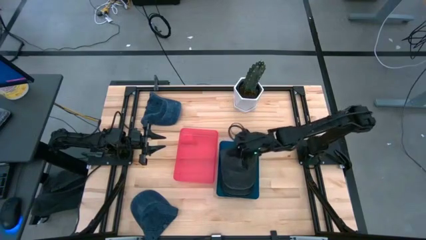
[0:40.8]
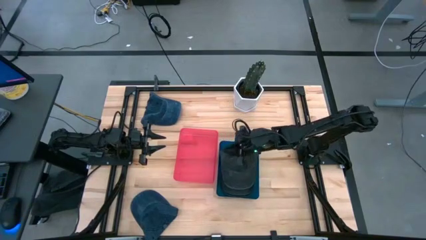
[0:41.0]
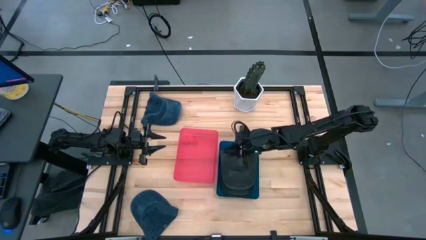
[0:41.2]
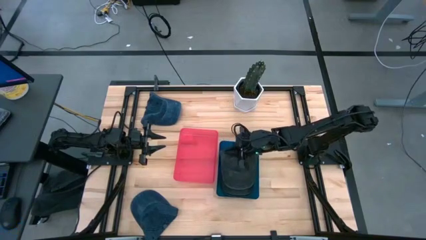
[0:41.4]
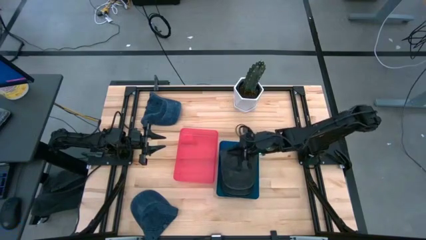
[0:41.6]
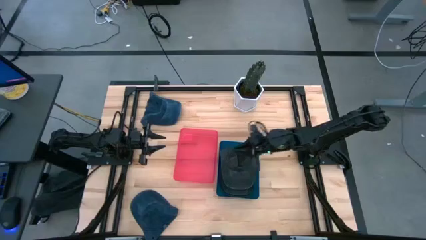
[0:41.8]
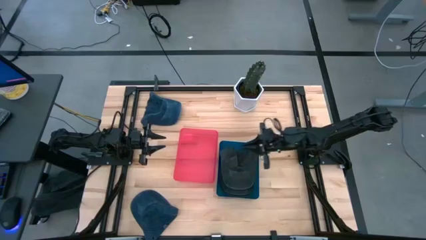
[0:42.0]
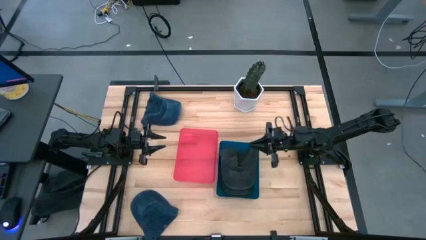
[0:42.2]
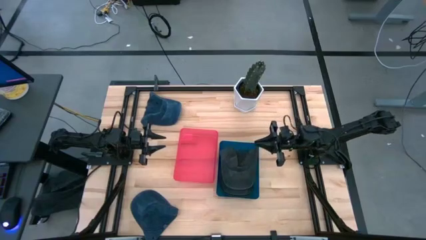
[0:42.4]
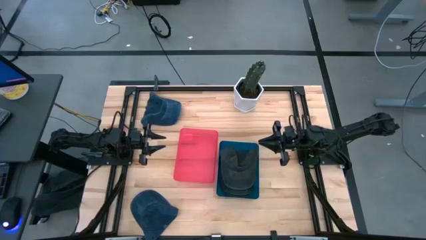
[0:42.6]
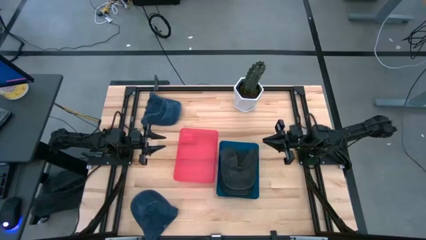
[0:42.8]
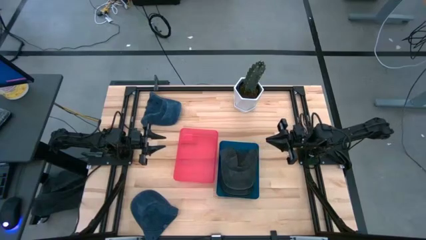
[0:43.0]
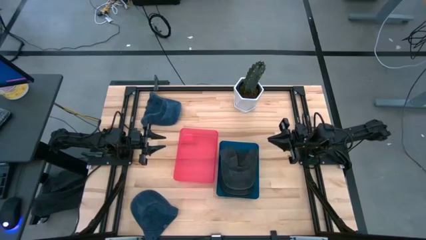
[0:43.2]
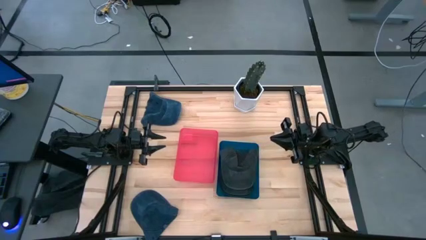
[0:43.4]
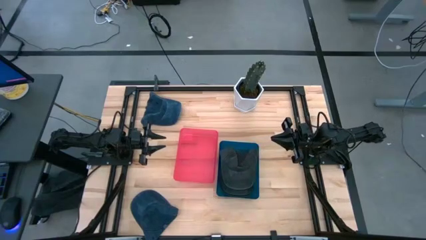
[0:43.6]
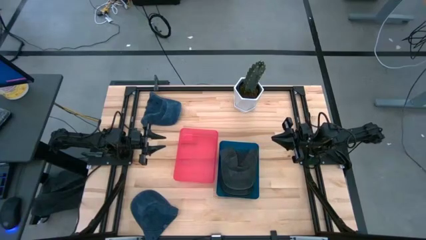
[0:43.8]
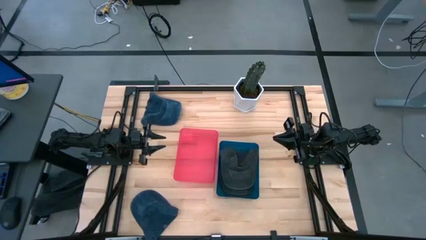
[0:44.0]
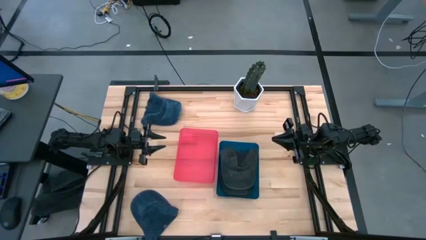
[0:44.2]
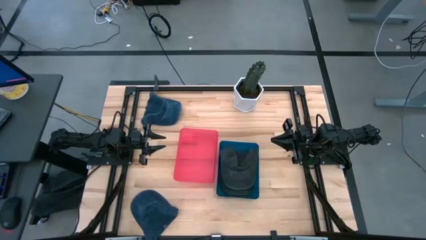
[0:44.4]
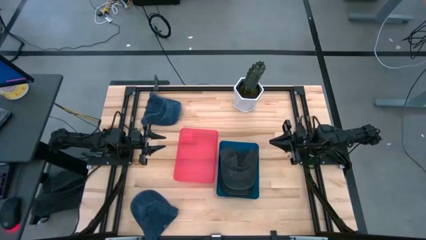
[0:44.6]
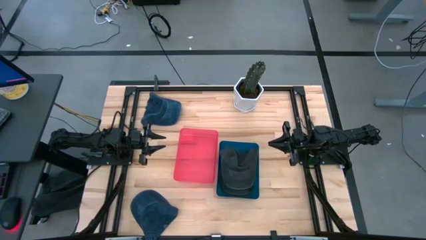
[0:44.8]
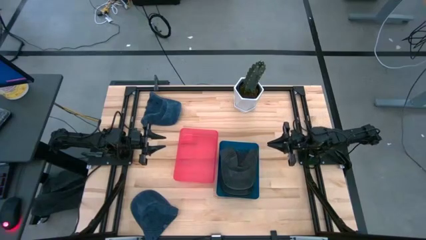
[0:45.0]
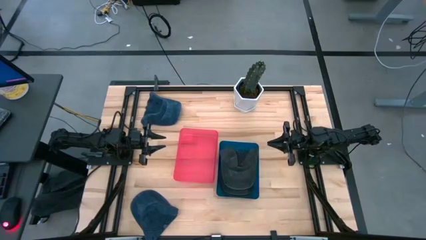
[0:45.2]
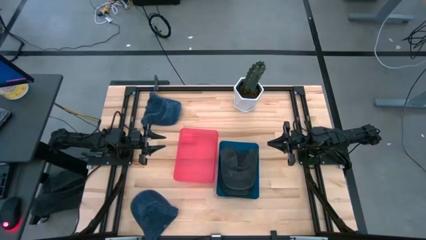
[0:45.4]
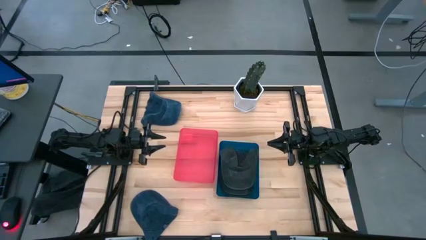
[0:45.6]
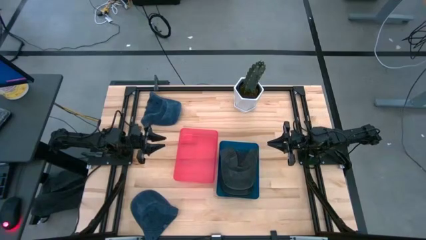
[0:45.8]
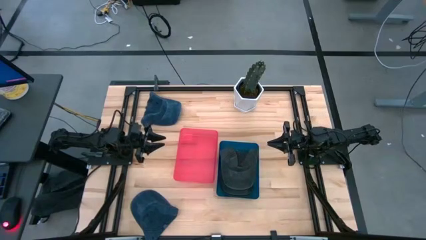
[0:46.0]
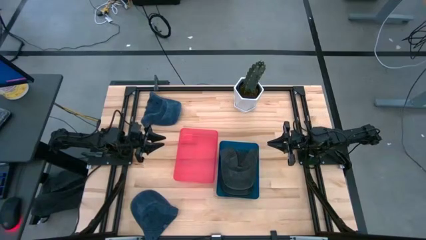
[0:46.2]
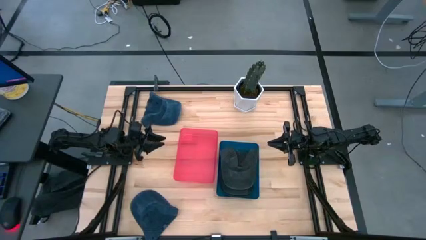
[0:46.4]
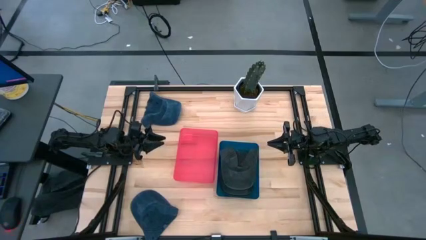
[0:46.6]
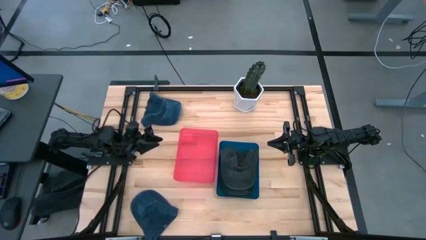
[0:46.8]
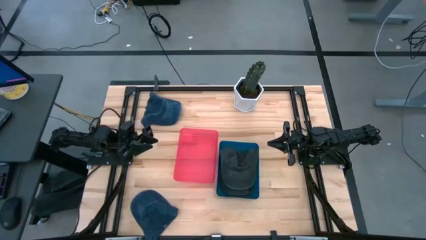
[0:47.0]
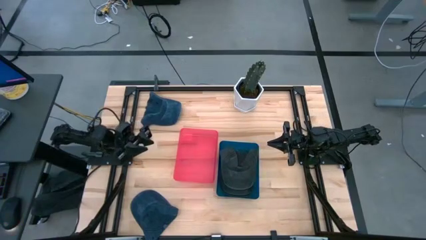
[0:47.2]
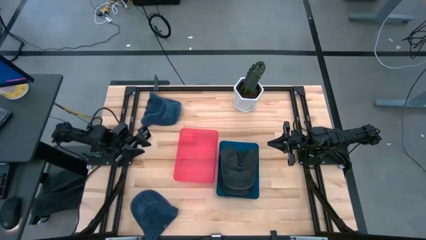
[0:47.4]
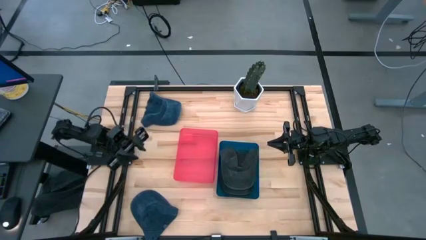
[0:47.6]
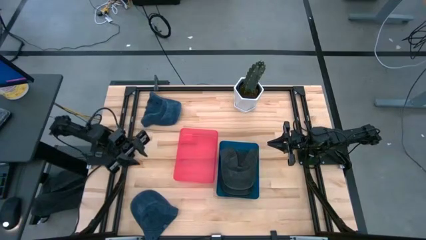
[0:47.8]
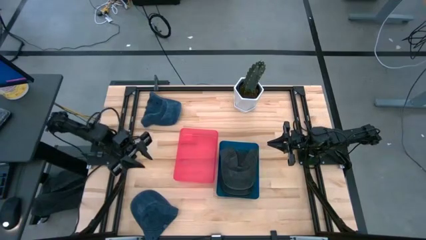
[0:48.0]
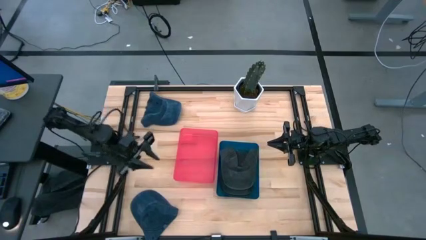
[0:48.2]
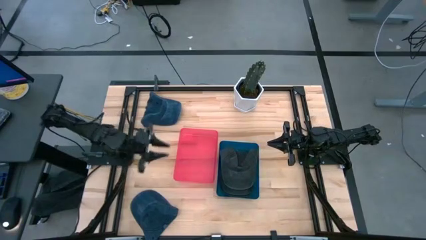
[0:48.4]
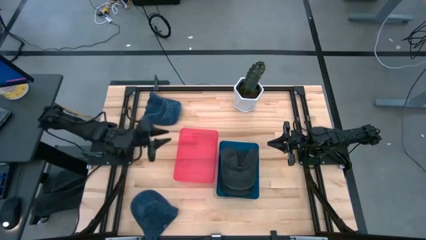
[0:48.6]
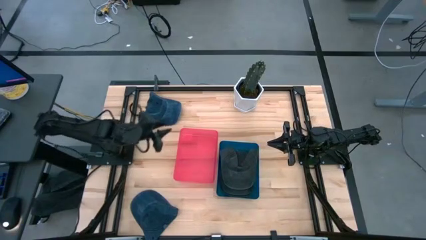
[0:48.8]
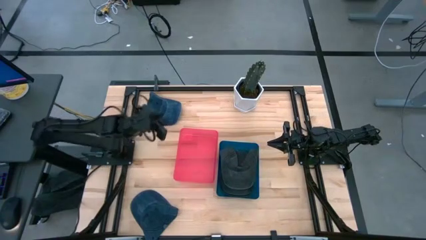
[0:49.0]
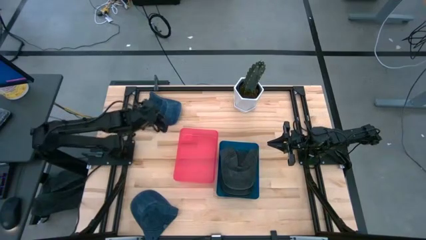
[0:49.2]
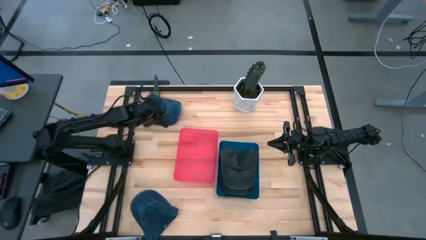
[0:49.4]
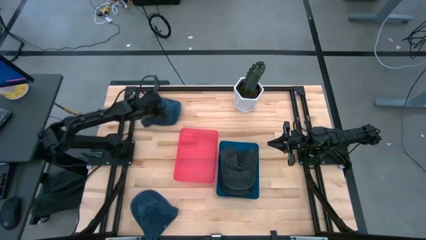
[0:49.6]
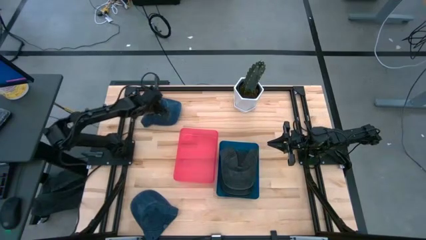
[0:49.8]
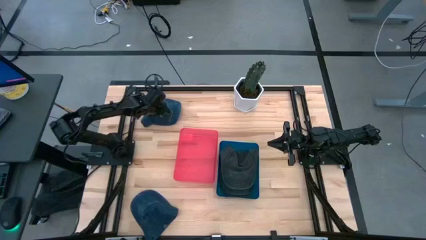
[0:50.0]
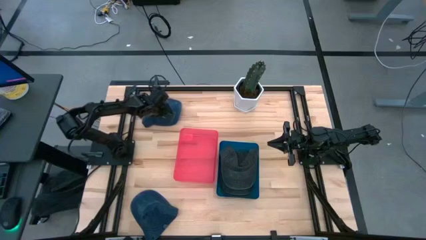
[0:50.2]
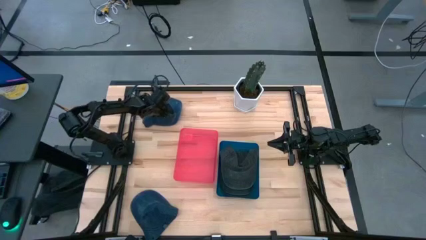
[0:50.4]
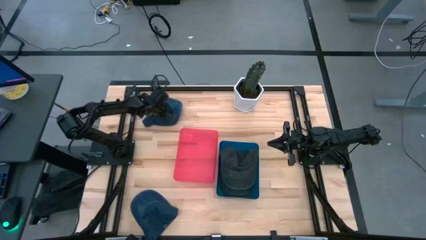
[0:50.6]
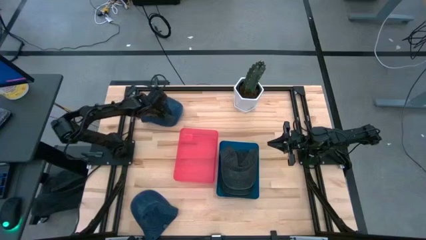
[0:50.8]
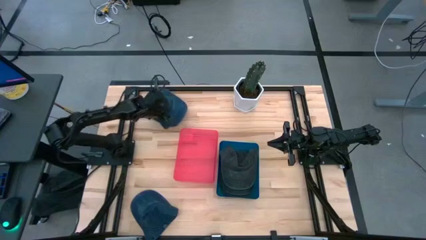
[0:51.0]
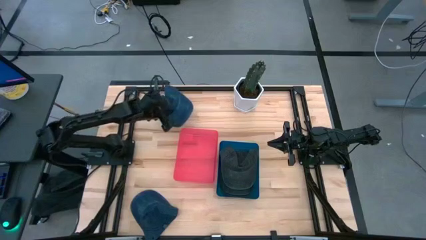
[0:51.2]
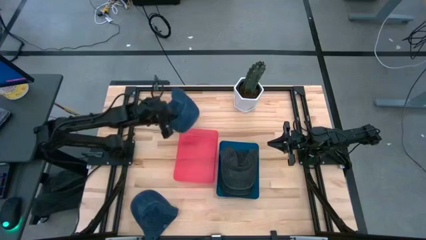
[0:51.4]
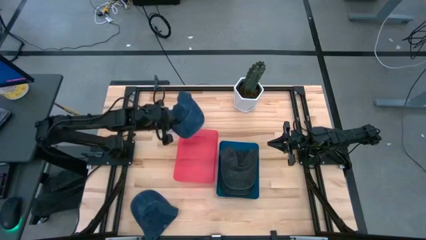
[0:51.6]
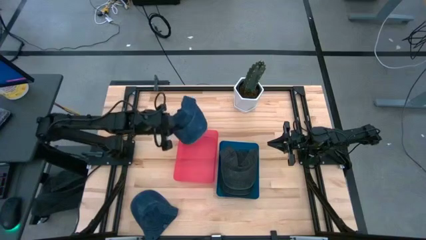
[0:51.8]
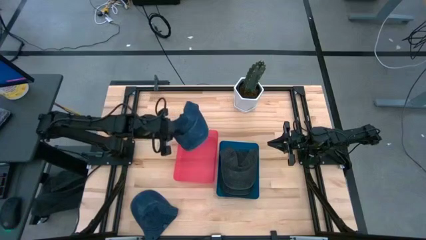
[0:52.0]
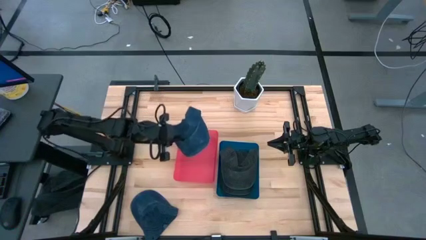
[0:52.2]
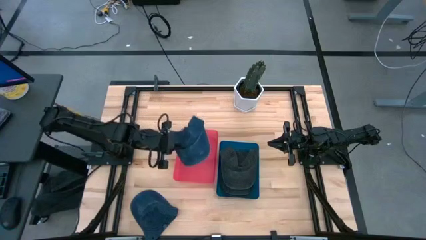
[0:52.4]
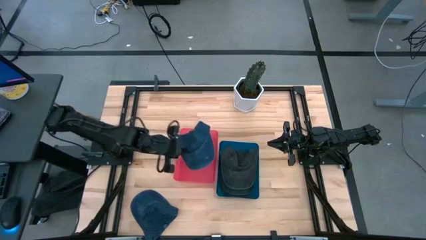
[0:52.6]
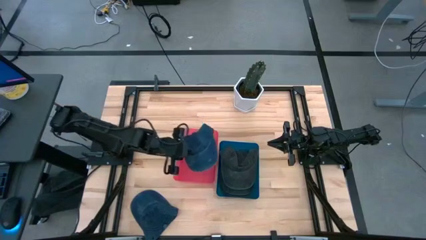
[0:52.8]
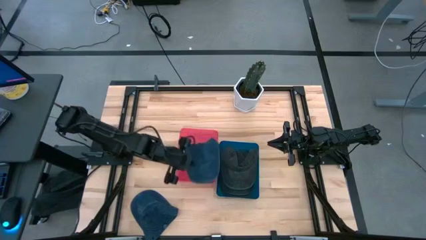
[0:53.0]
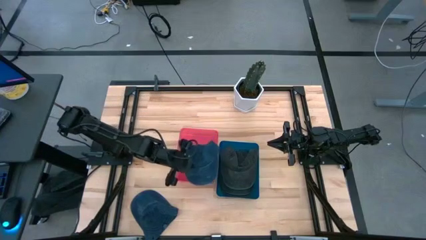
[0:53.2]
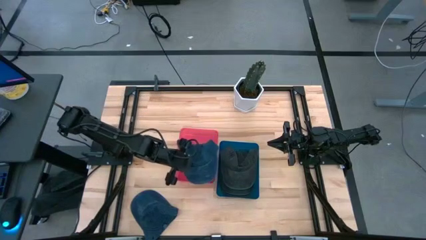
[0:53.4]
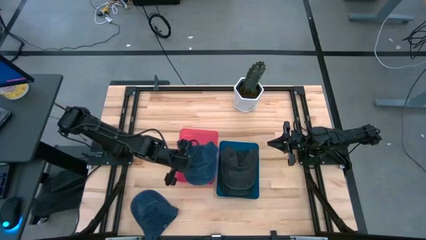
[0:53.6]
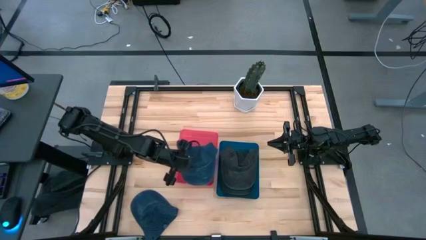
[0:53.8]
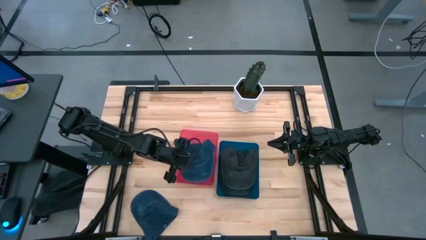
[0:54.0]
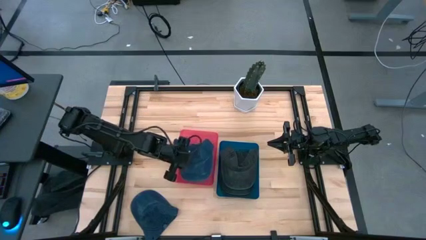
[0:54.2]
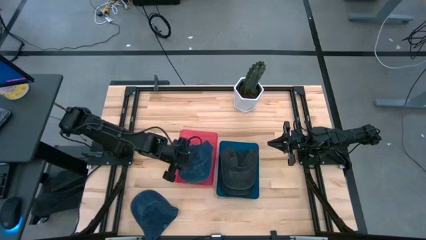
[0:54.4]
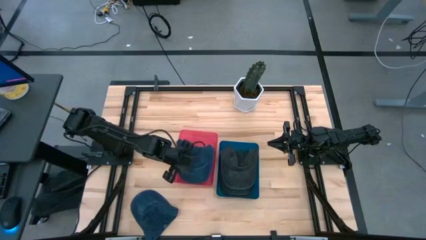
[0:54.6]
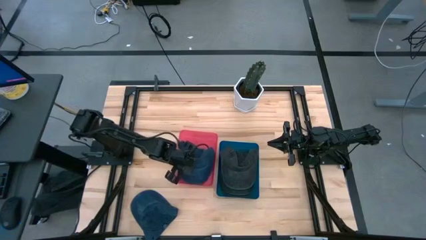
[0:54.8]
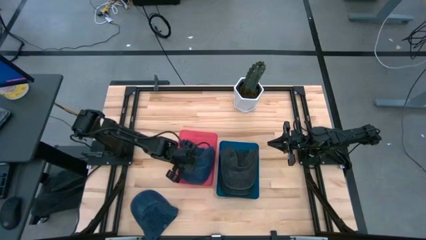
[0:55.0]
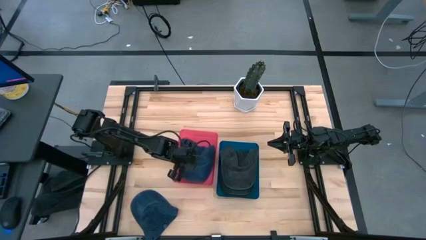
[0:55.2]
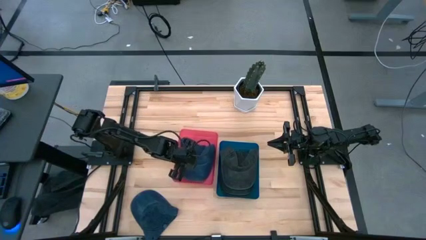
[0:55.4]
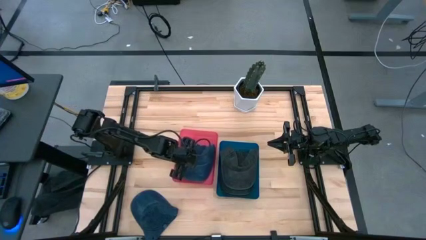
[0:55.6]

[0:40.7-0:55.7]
Task: Pick & Place hat
Put the top blue cap into the red bin
